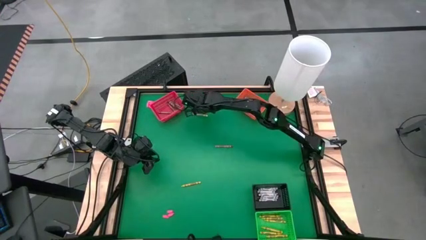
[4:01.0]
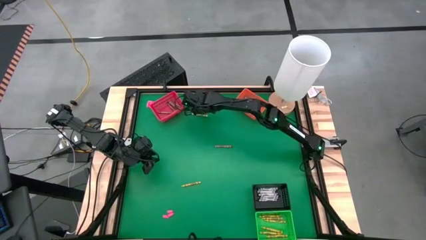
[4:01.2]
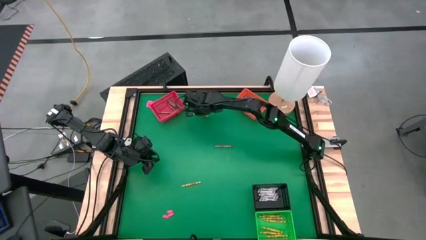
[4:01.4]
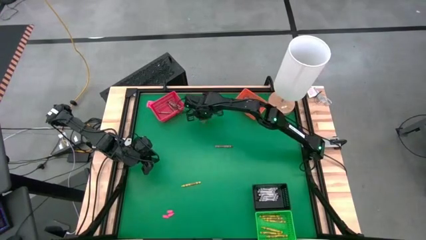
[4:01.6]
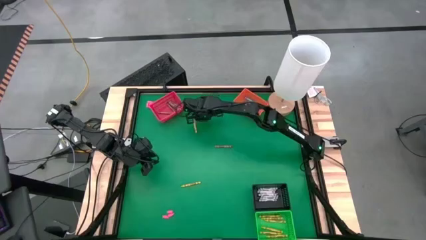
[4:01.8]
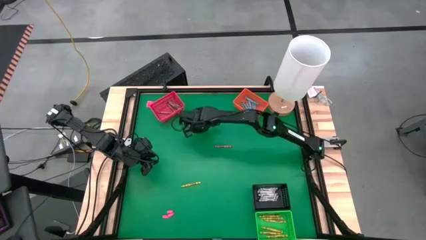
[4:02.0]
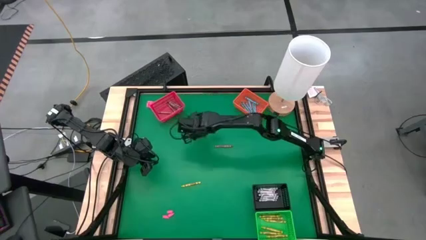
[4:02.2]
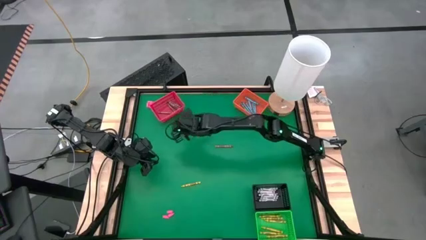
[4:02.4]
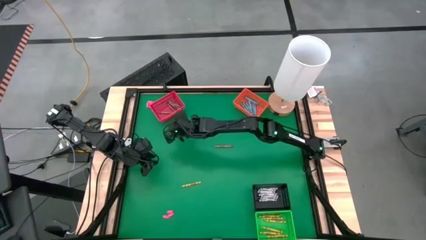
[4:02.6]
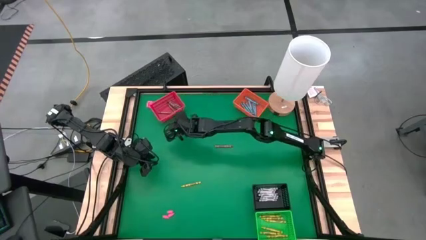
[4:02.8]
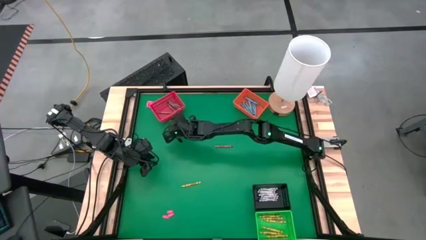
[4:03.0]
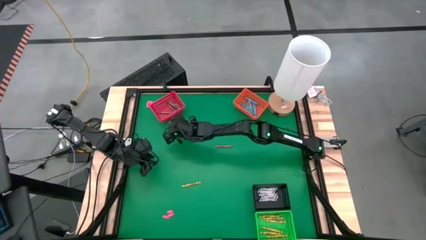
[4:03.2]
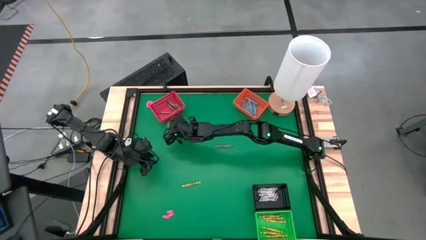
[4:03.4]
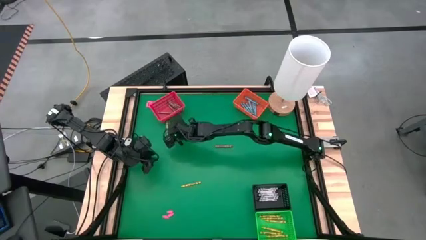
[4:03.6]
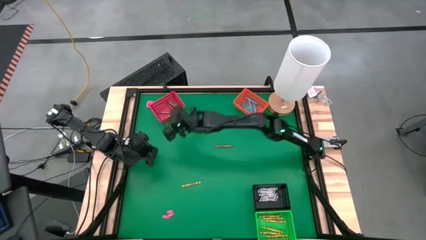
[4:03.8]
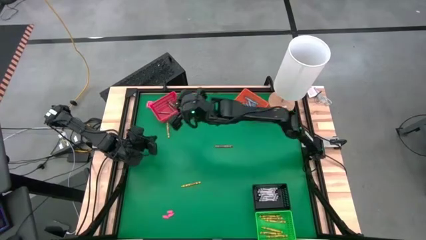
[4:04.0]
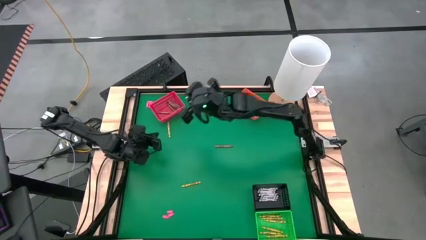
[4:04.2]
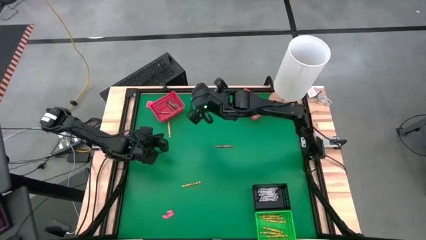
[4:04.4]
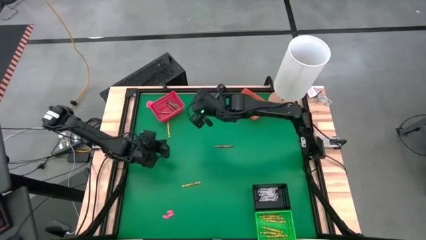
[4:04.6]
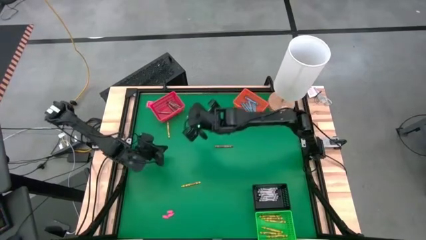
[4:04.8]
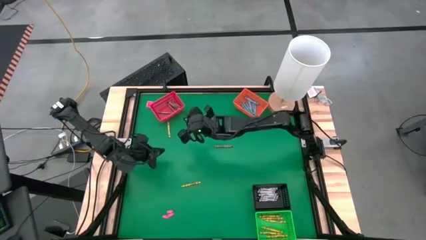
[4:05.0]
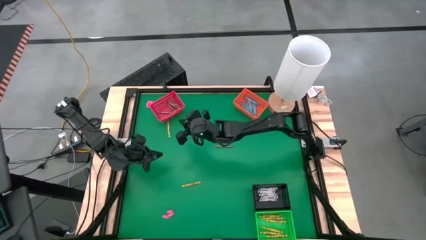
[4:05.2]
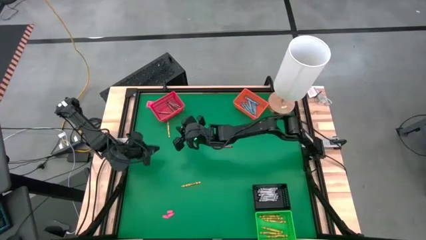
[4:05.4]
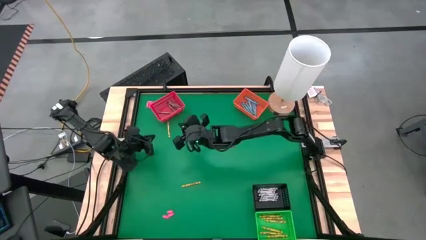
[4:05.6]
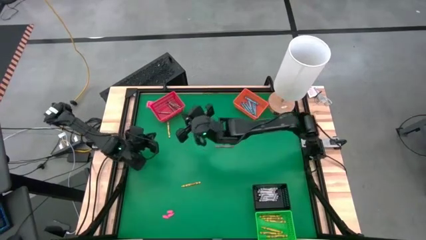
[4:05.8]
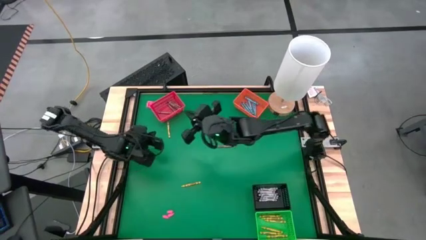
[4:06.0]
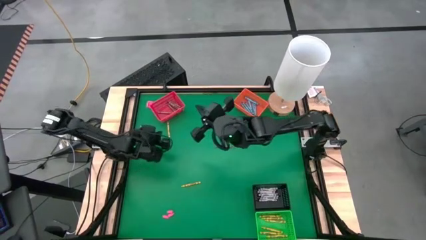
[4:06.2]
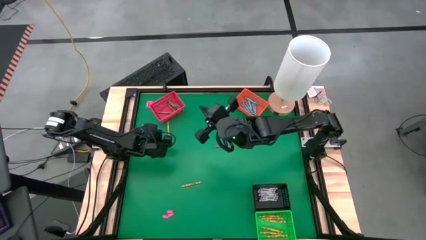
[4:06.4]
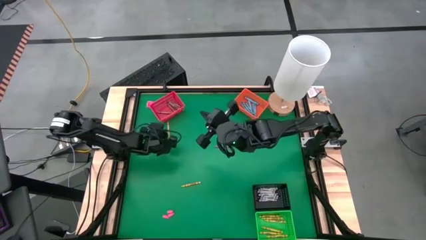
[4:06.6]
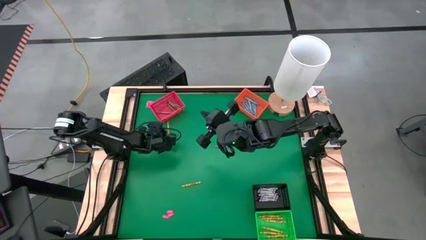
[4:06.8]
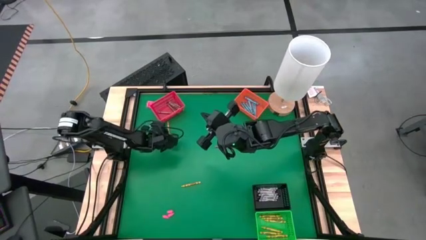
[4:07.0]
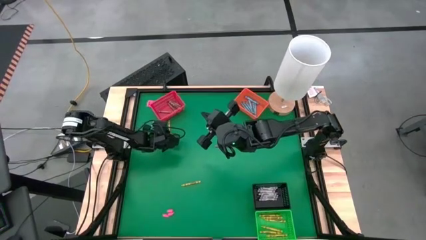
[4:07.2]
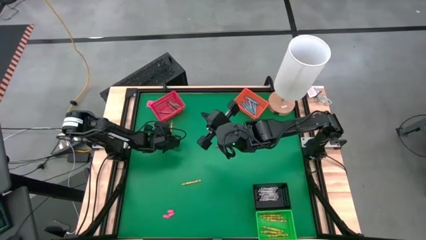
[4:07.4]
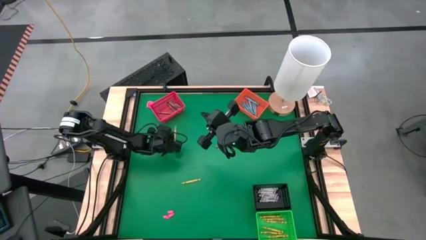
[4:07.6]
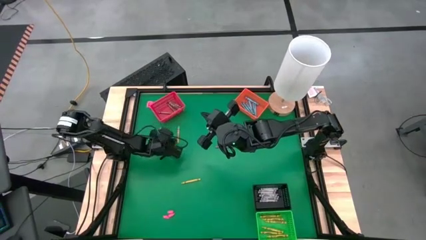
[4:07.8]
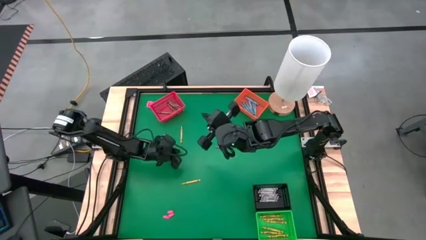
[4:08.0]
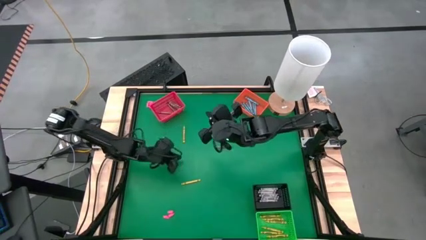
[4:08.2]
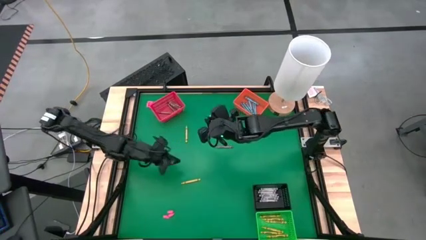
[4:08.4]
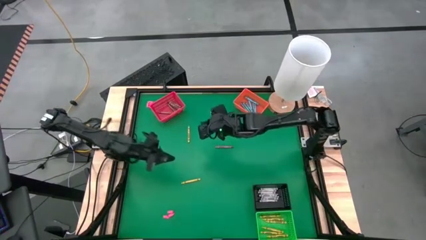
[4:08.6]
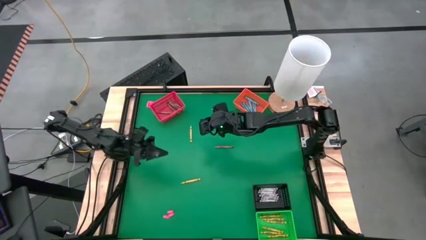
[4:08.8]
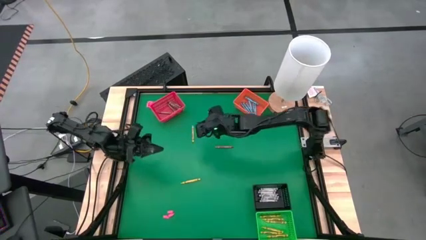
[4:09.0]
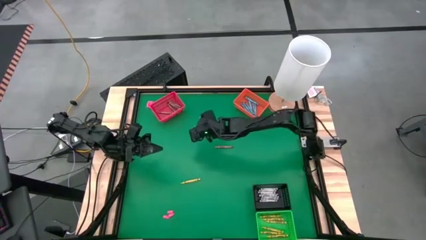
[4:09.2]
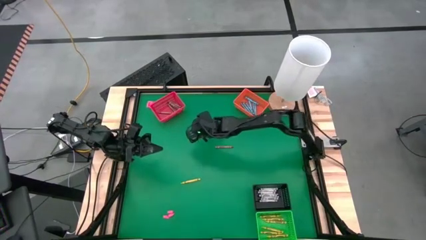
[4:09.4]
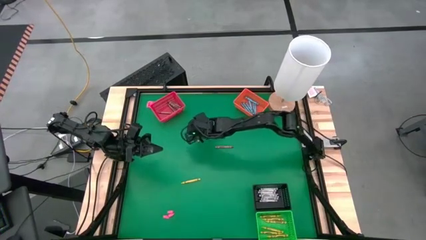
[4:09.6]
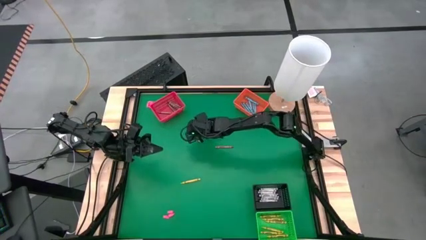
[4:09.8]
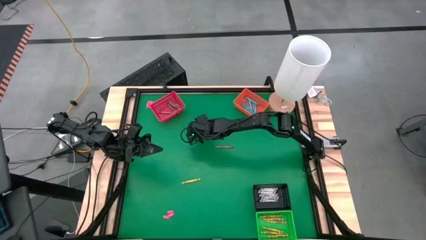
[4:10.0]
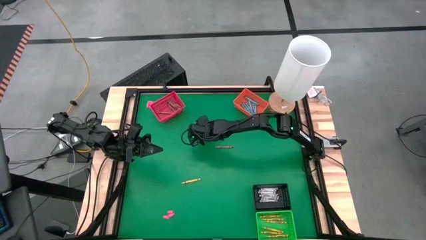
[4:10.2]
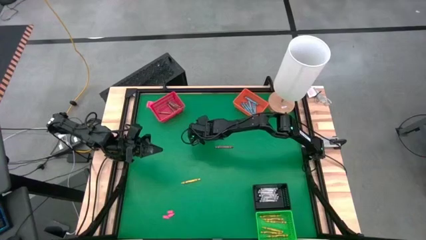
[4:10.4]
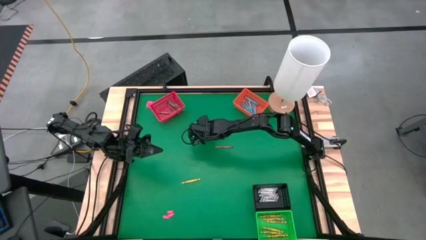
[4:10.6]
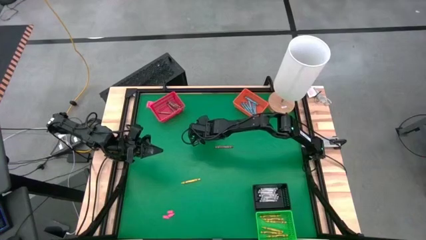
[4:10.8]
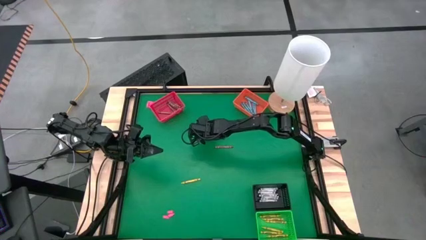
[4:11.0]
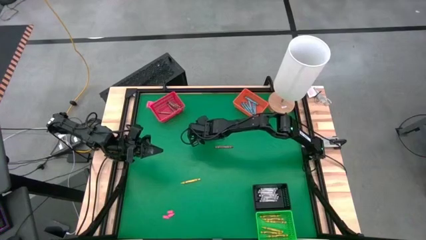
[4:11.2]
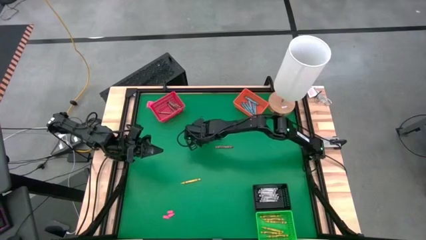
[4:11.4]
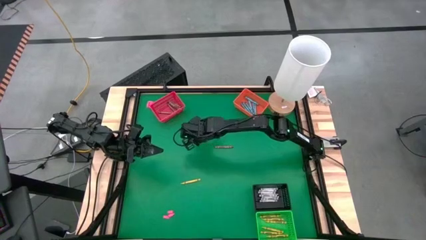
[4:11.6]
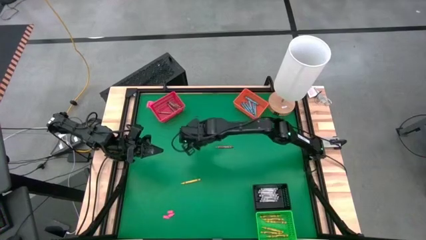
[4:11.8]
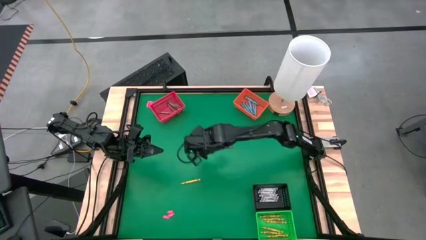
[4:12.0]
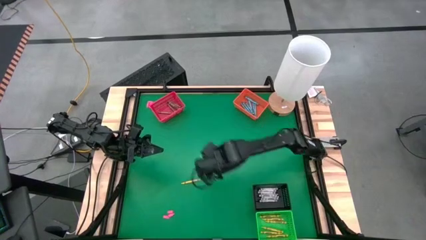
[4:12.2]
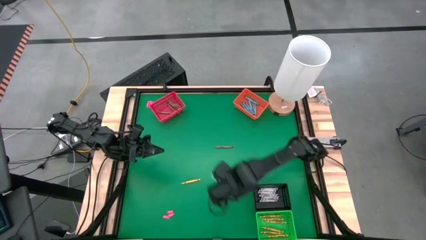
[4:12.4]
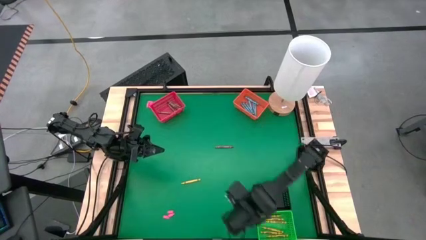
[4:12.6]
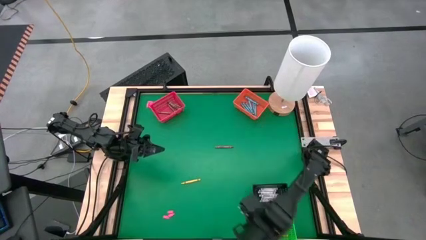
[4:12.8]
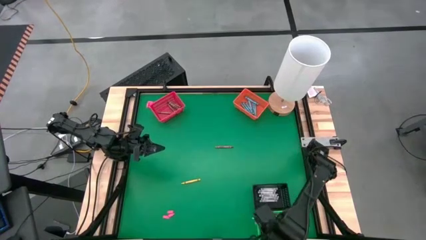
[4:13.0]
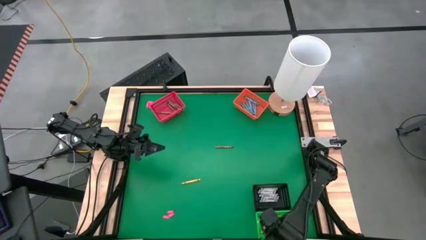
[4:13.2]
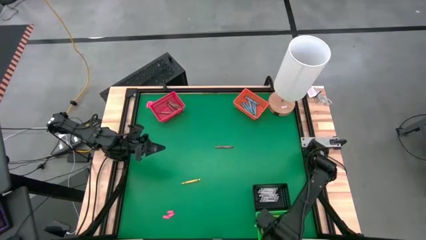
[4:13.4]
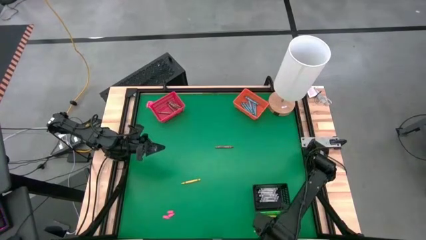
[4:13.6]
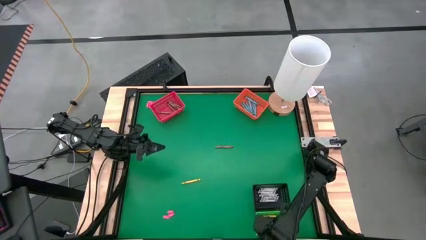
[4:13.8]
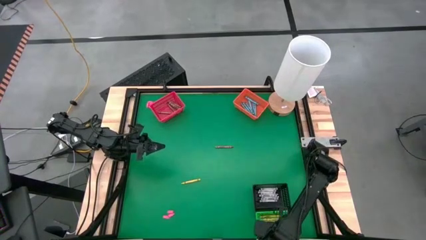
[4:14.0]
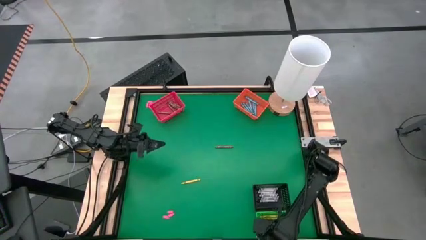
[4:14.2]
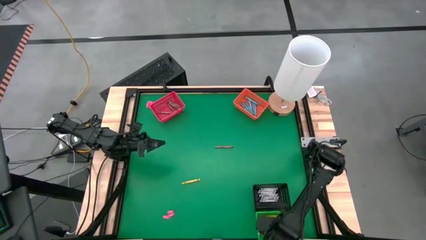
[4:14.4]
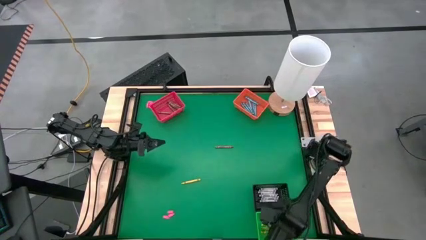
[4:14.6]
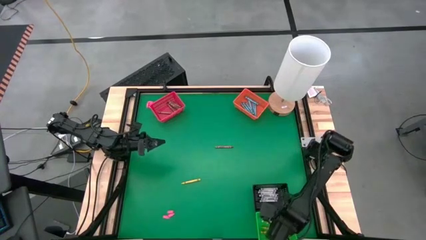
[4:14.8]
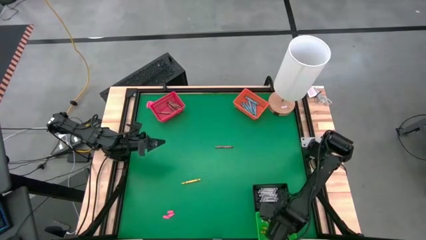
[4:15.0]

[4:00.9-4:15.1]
Task: Sort crayons
Put the yellow crayon into the green bin
